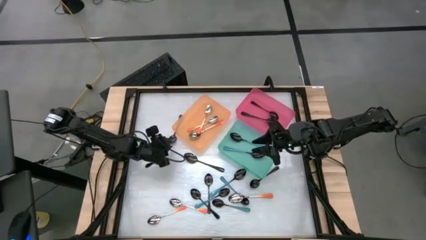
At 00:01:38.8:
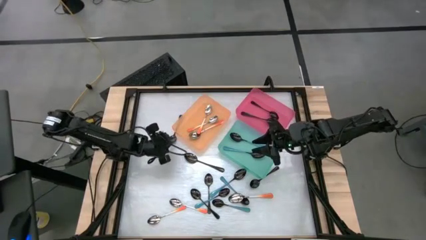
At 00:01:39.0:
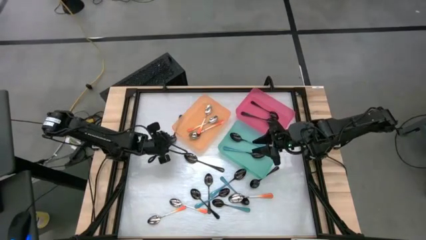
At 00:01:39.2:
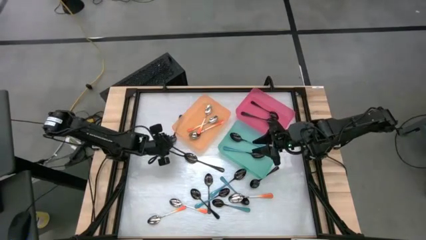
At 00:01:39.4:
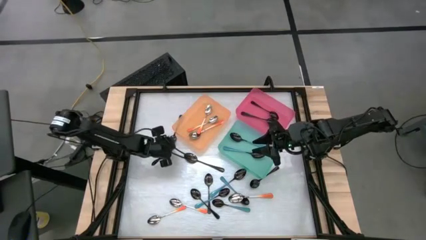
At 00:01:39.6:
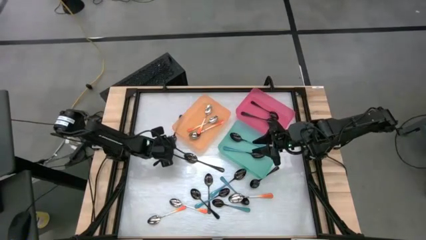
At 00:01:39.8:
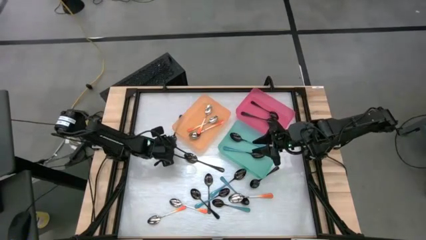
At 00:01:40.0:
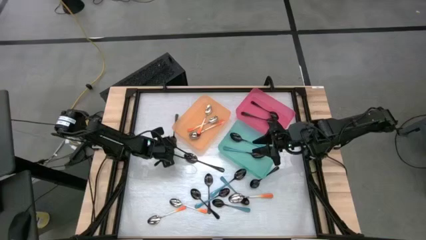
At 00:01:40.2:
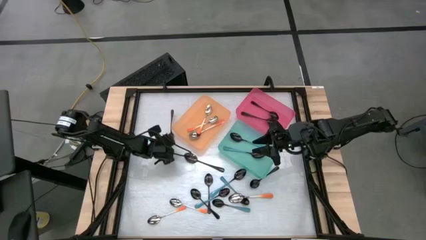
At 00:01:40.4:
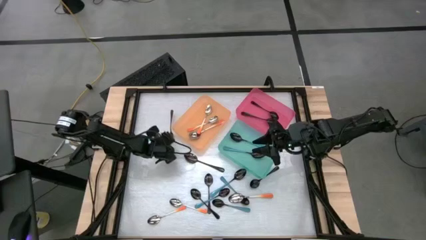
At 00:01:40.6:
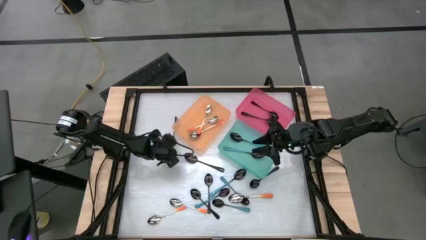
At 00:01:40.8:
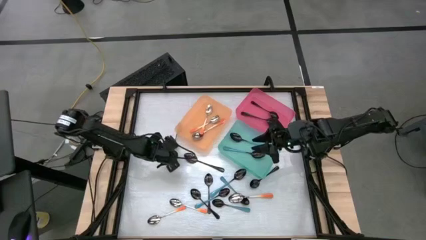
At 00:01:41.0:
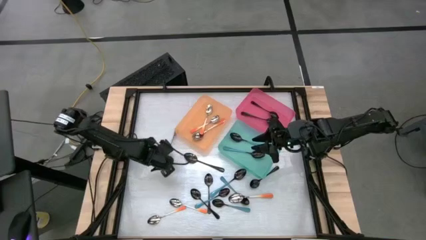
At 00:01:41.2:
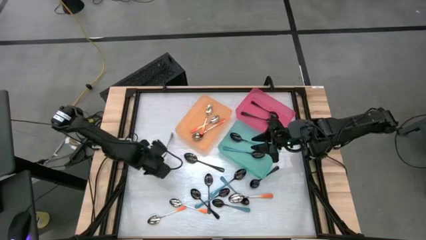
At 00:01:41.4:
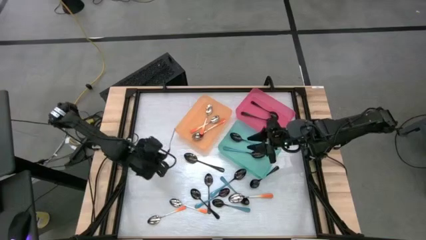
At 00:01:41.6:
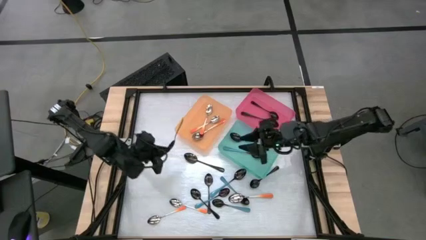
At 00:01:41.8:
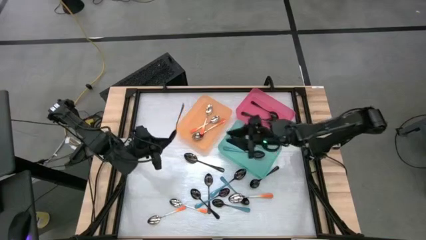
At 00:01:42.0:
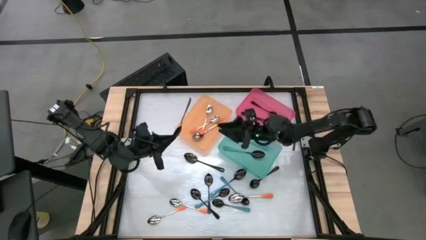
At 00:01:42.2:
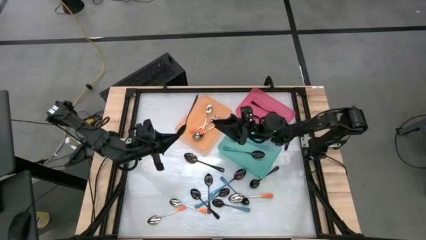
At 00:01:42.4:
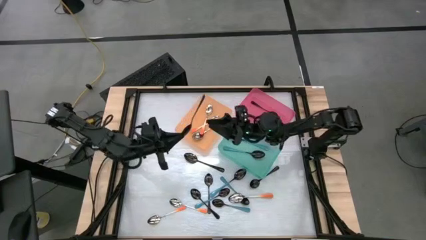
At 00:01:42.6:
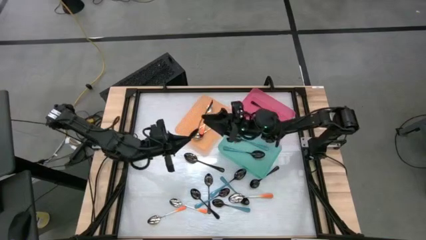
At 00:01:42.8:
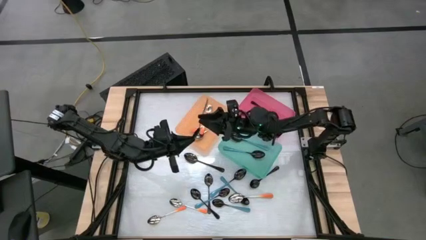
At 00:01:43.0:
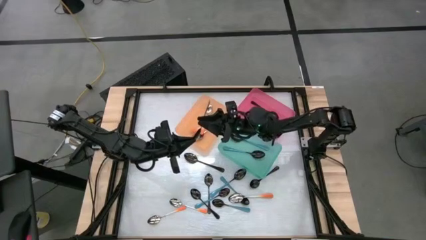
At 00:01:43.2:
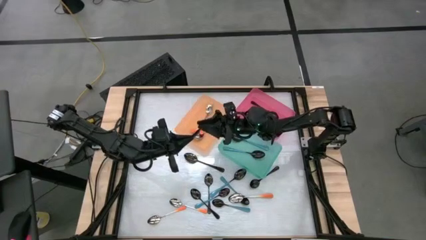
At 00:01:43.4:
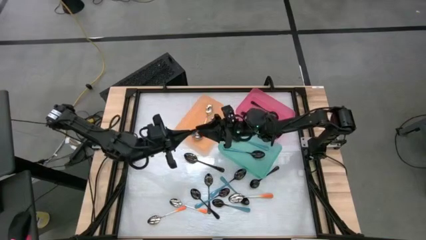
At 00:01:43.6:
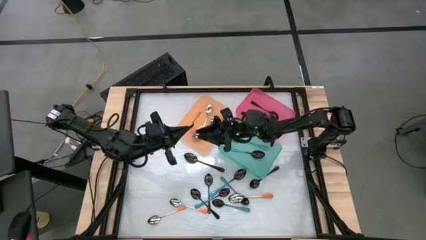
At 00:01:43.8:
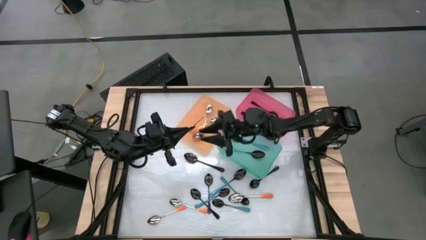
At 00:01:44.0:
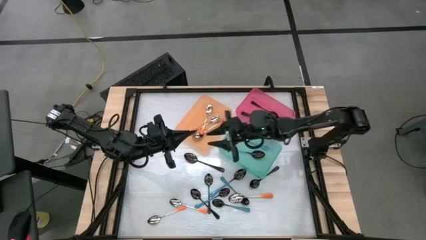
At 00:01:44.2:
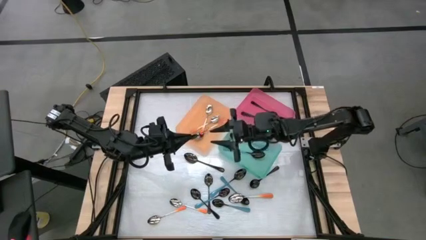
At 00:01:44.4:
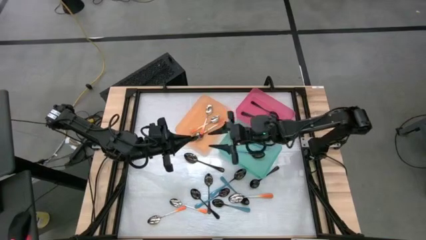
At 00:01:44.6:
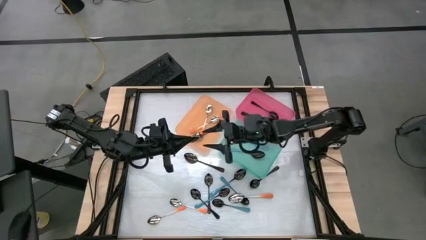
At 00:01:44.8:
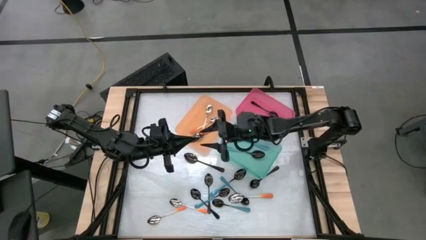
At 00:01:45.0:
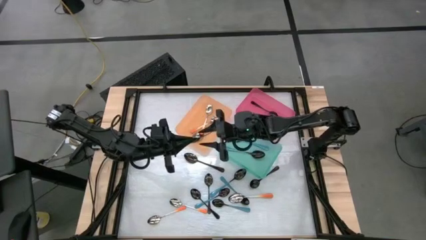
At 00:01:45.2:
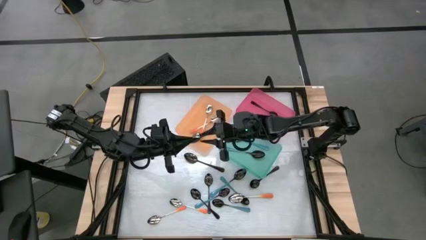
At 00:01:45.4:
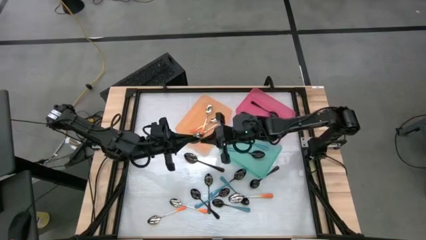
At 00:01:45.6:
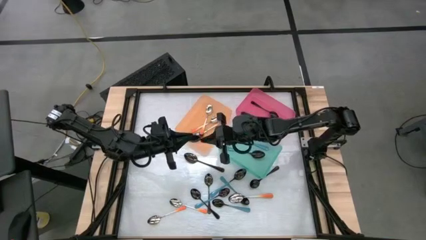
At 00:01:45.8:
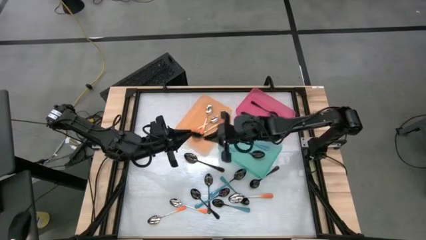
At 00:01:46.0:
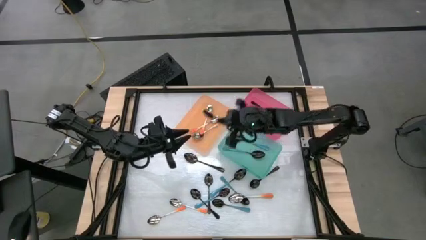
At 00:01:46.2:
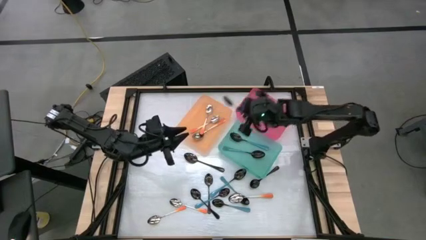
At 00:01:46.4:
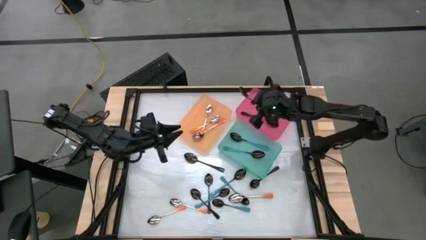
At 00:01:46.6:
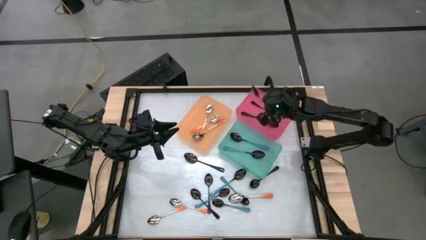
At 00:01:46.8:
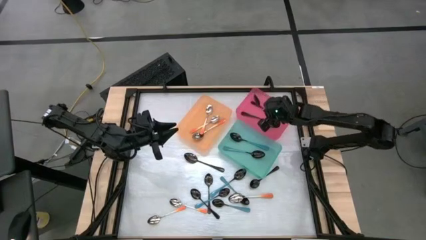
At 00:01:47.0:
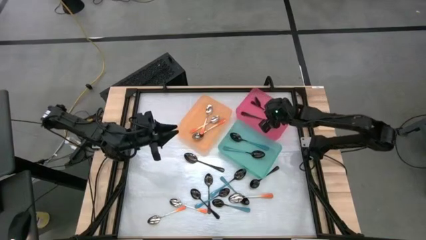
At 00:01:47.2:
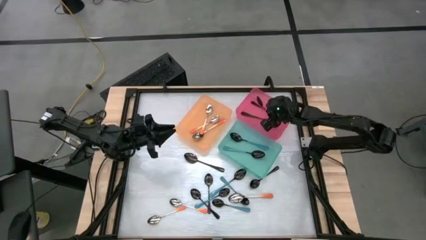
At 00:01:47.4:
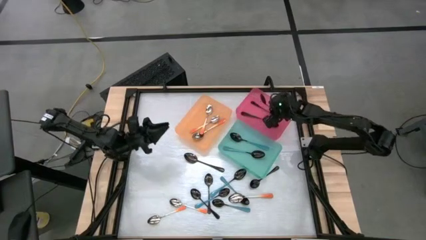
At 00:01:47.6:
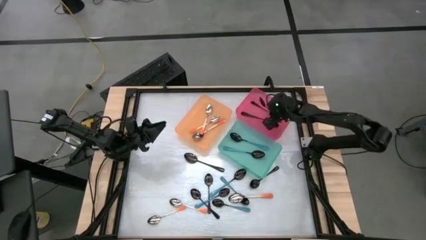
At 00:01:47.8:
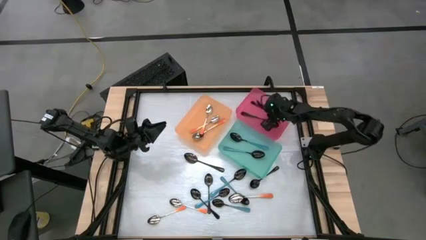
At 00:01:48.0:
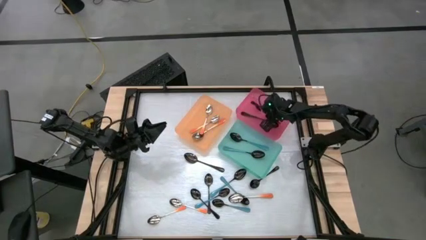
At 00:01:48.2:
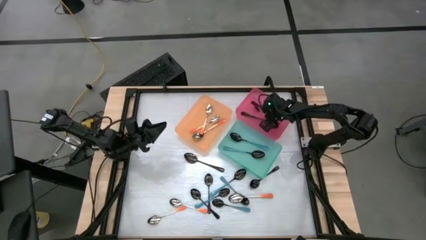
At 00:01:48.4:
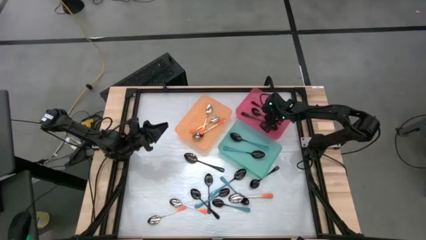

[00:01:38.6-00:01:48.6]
Task: Sort silverware by color (type)
Put the black spoon into the pink bin
